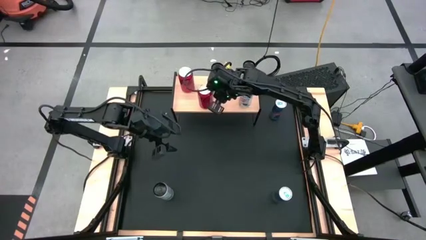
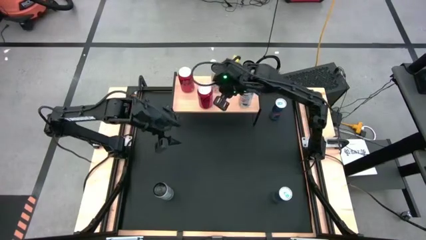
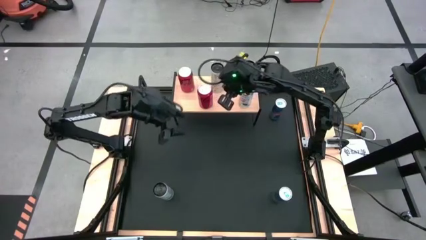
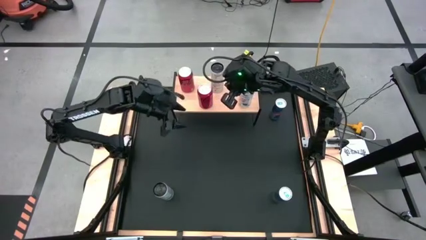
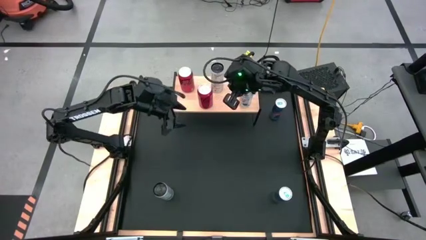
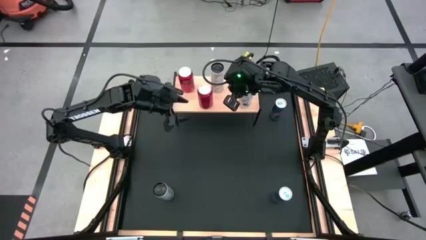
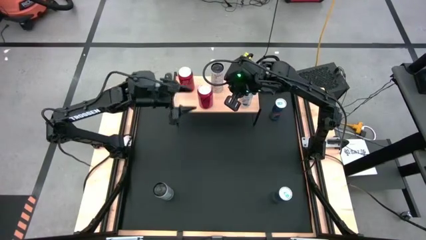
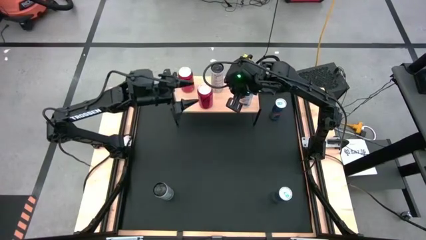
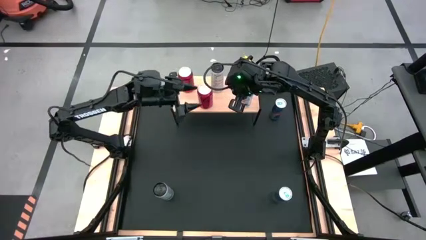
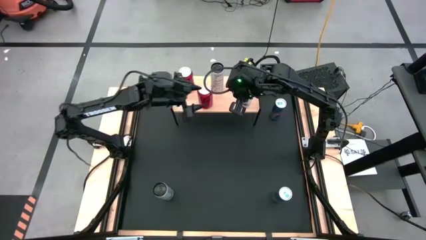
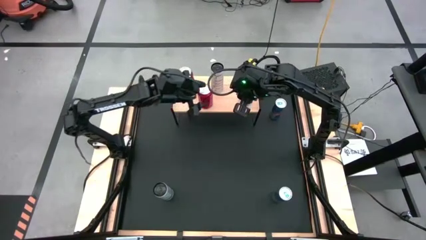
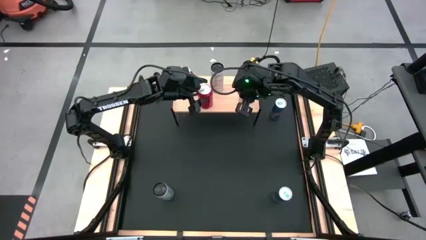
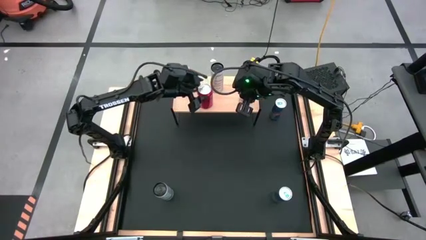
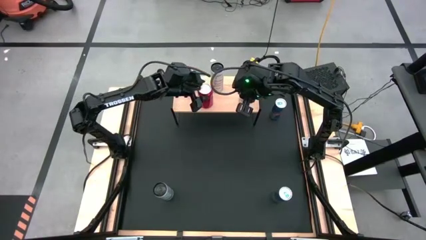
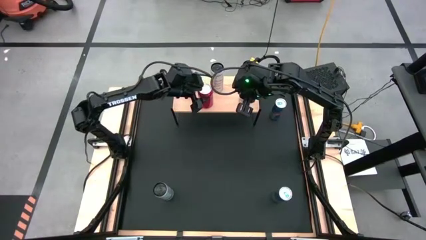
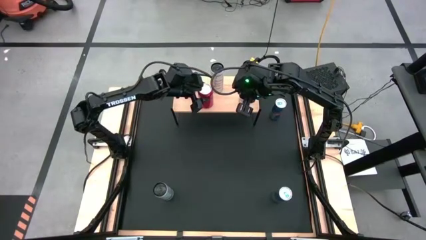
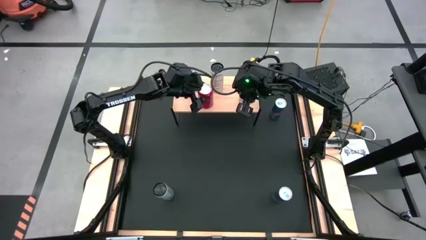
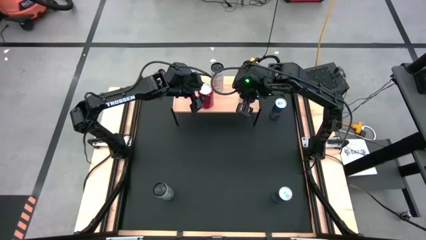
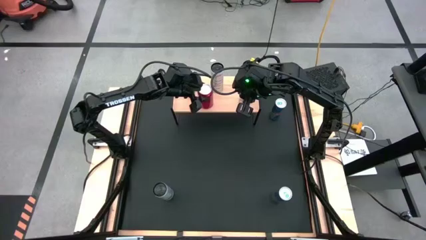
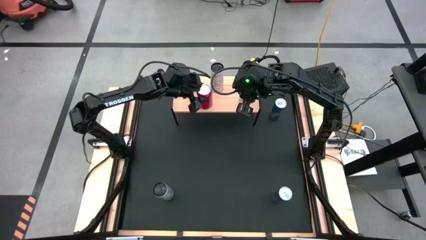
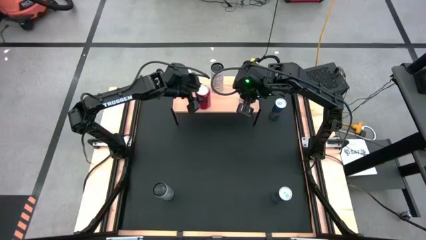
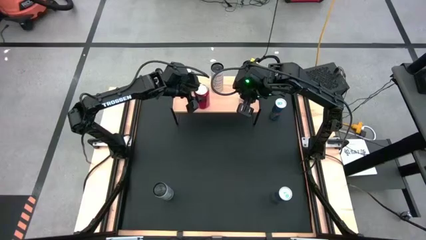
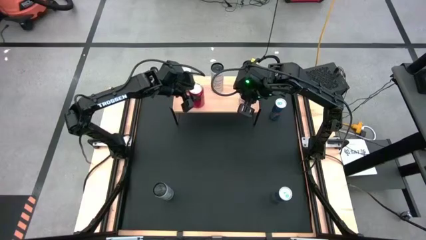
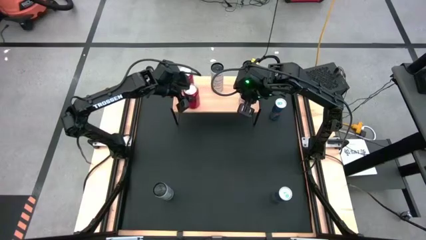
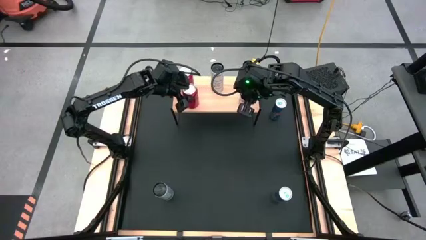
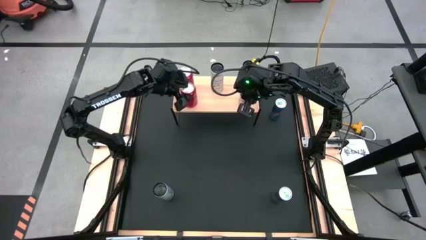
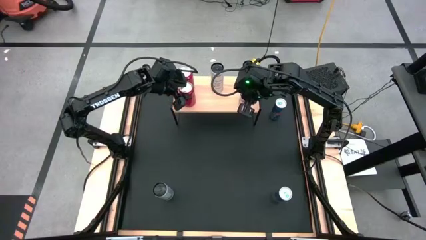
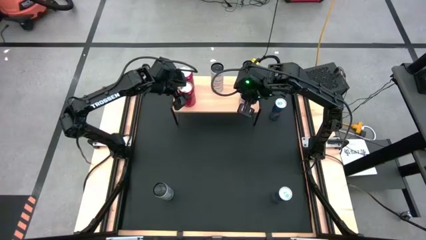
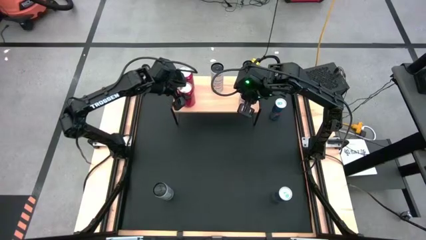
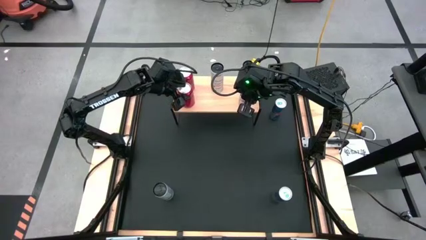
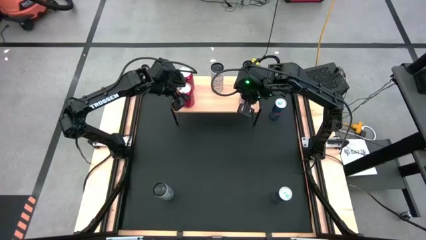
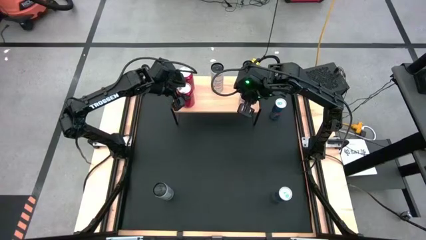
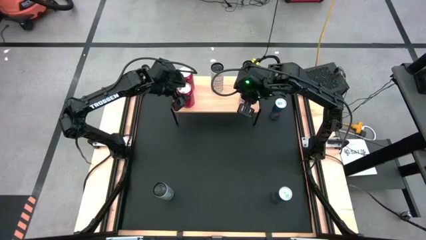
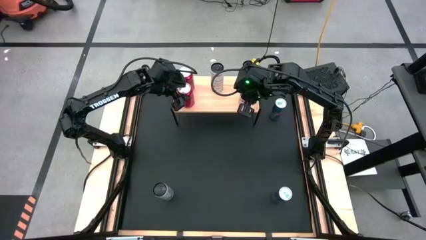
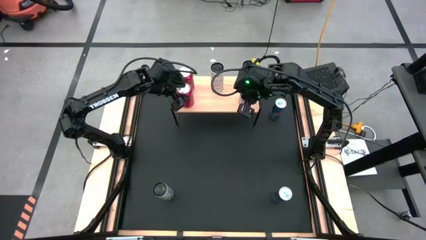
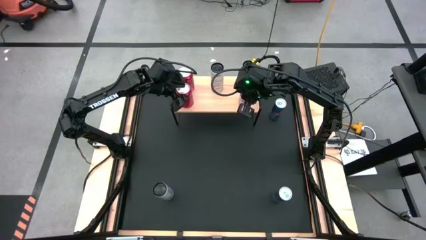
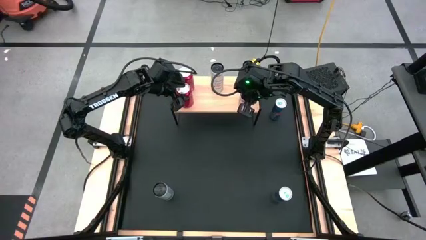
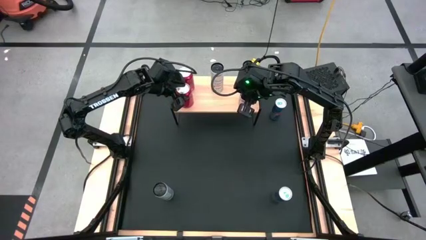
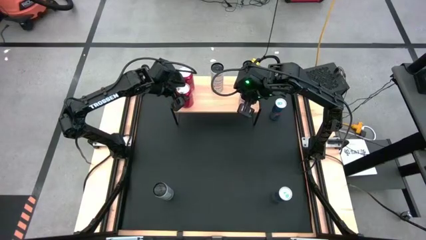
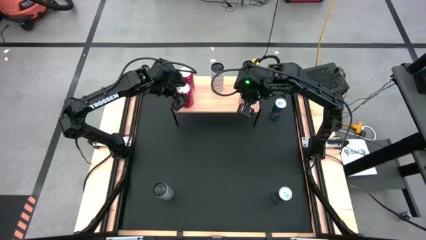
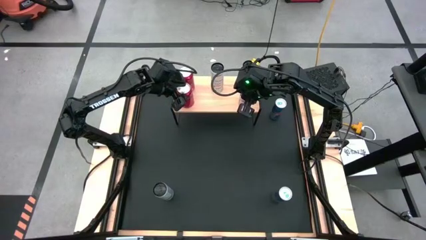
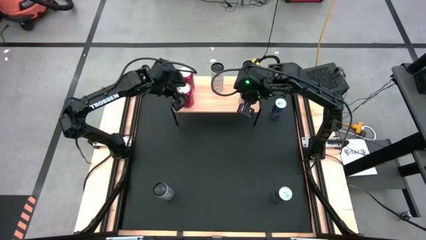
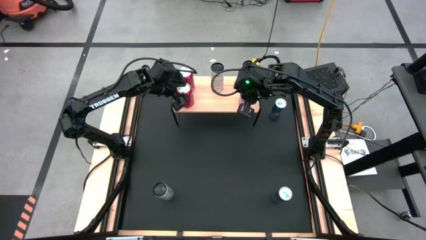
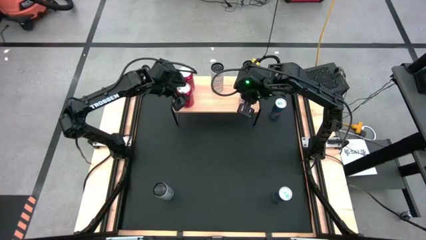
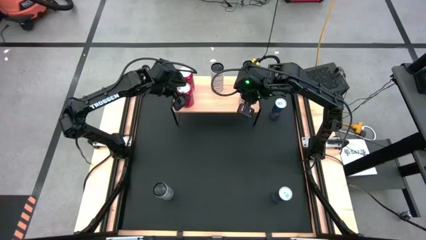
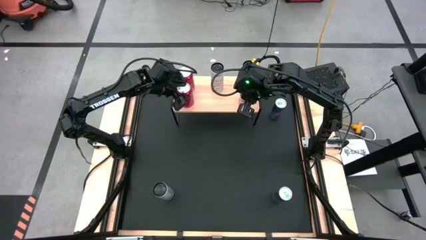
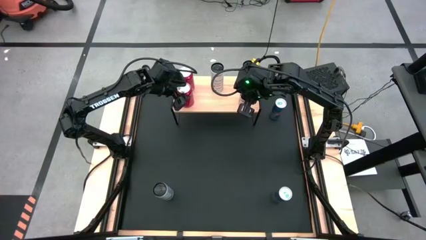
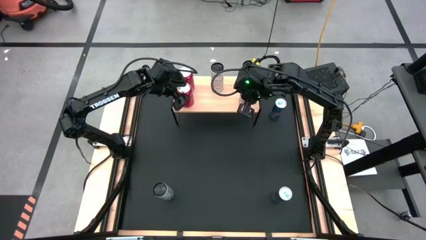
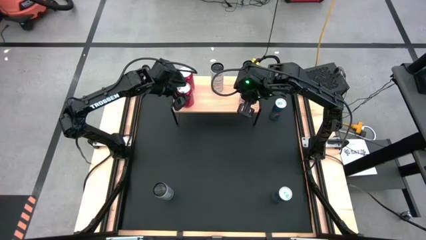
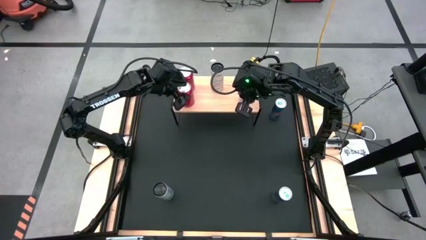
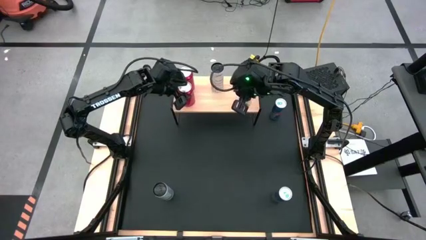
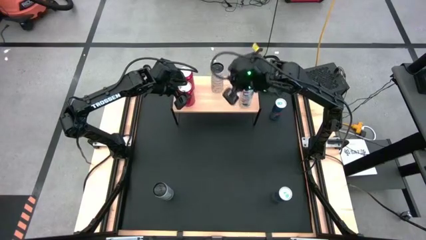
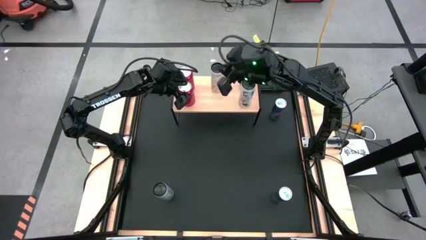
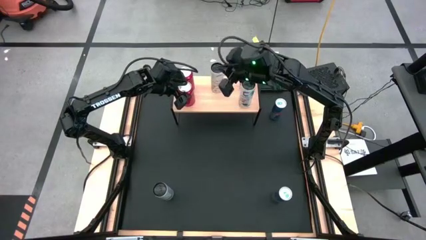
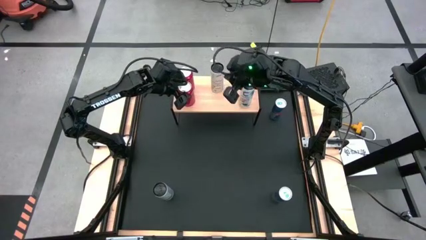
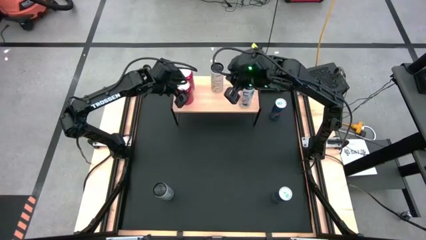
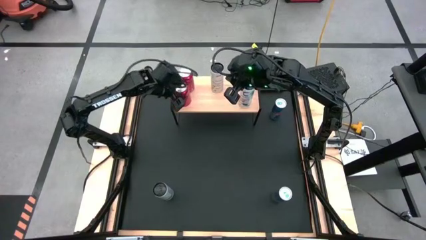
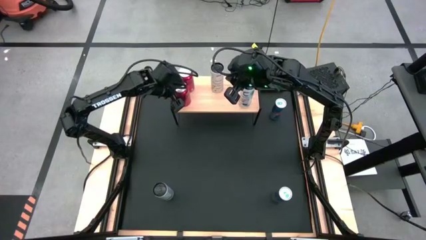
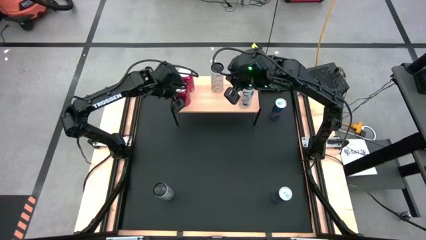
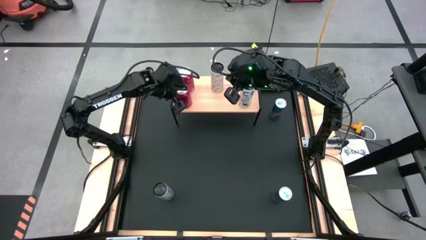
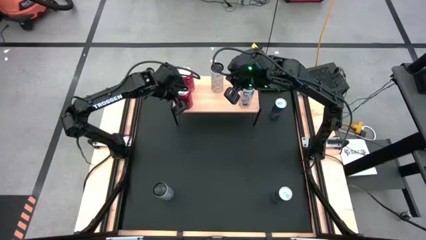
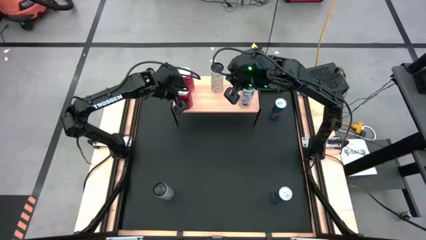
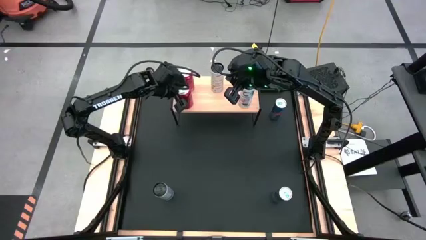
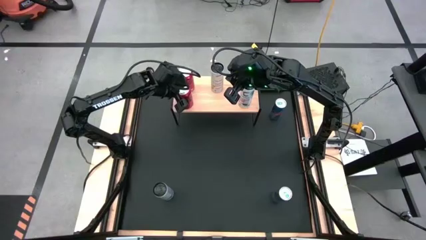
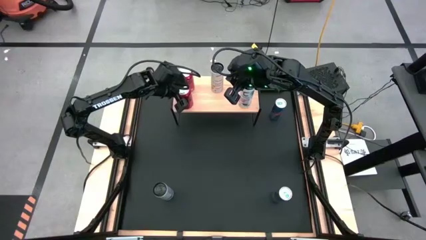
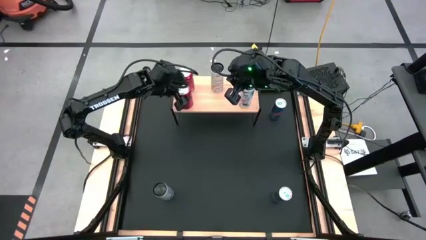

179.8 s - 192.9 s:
Task: Place canned beverage on shelf
Put the red soda can on the shelf aligned with the other red soda can

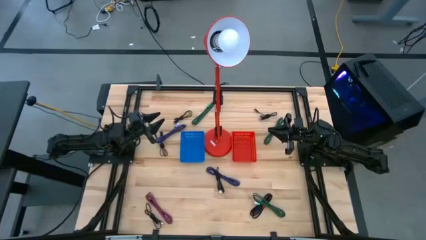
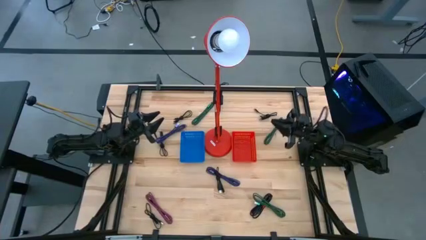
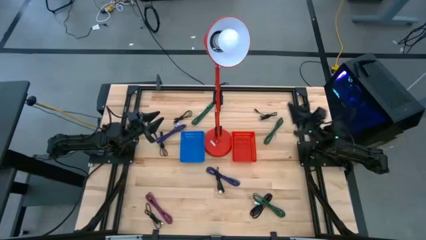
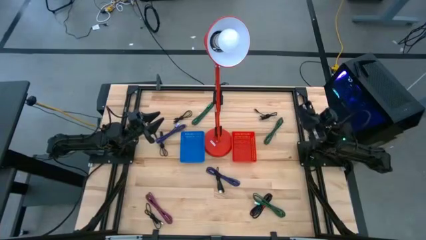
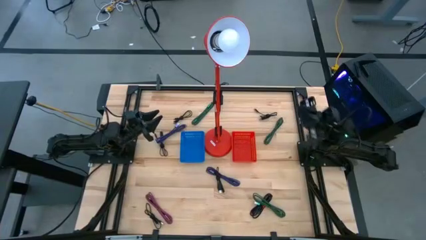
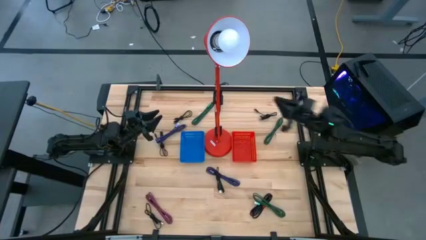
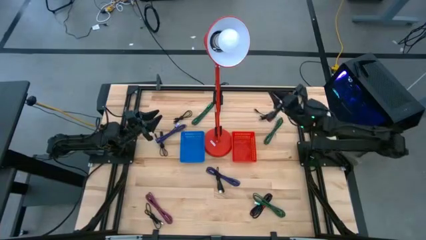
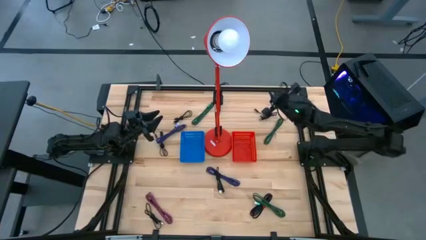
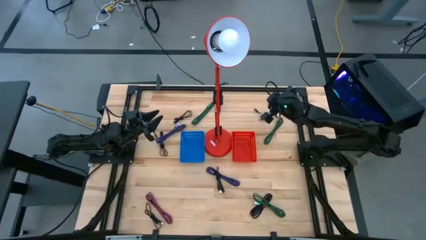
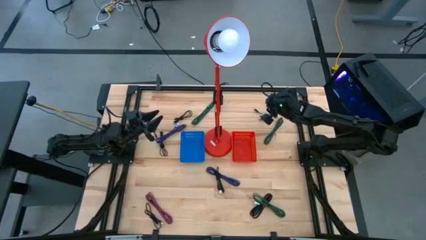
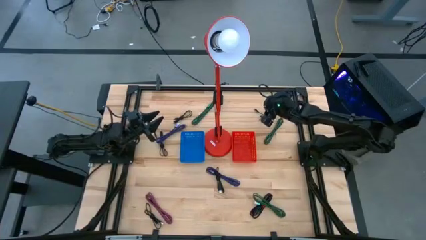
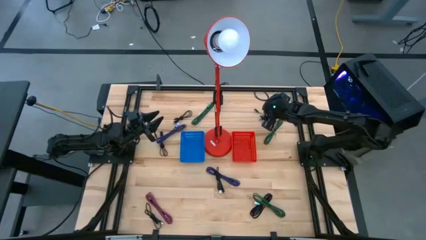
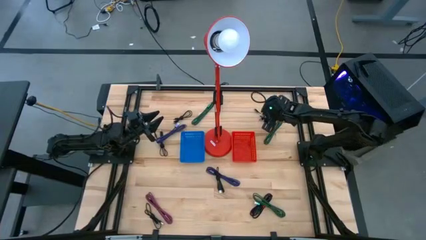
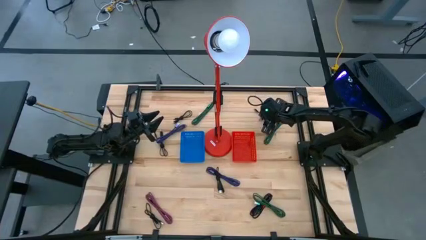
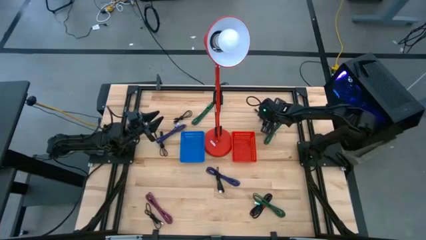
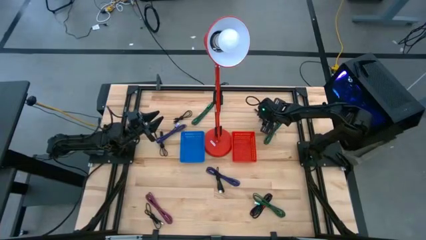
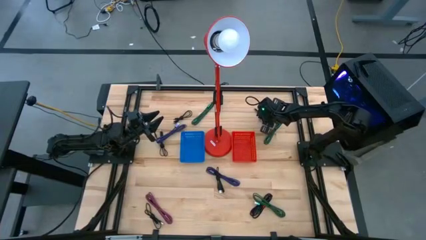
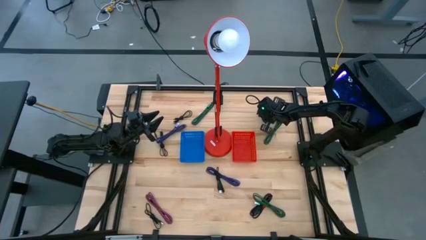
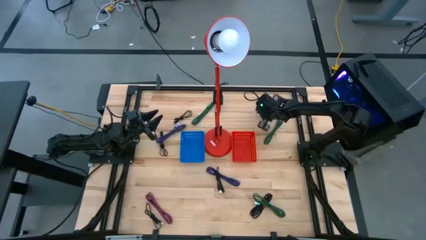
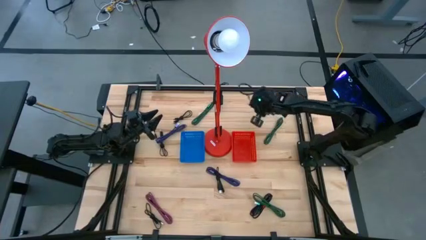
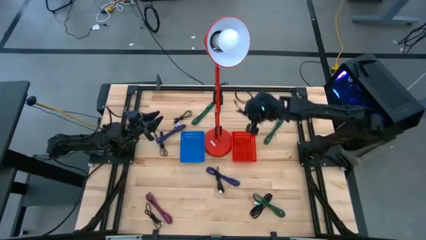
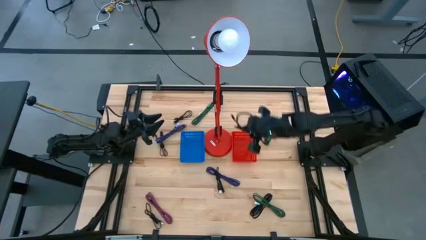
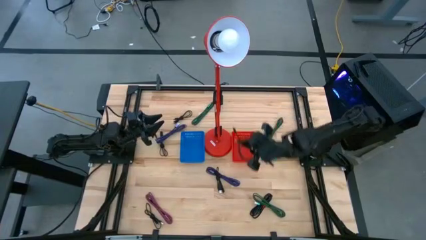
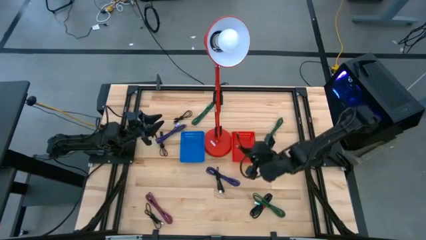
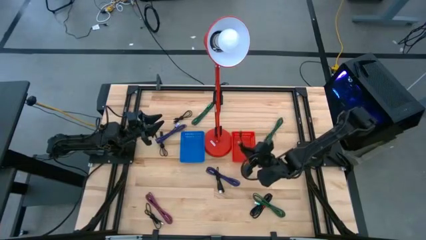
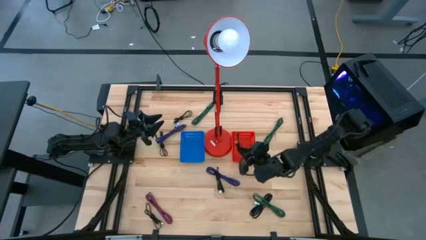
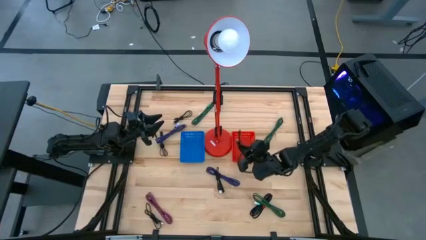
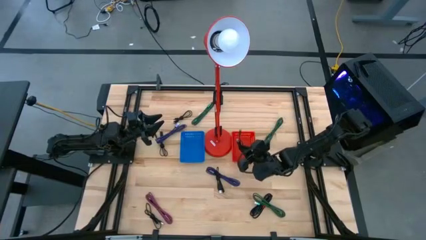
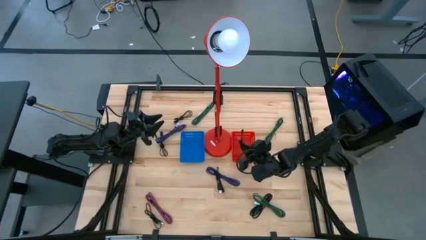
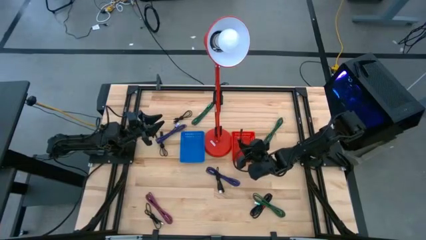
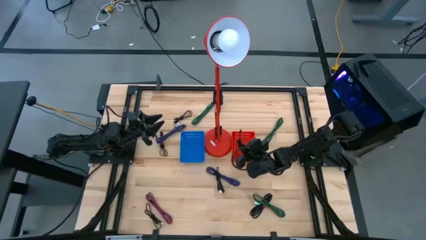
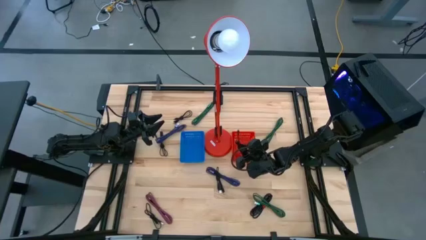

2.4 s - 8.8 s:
Task: Pick & Place USB Port
Put the black charger cable into the orange bin
